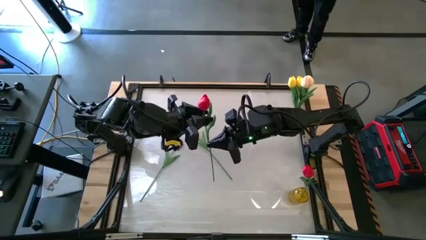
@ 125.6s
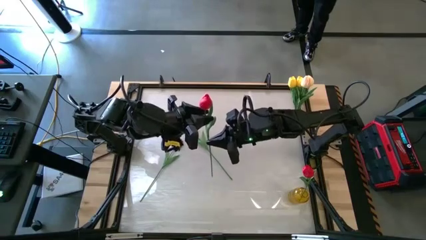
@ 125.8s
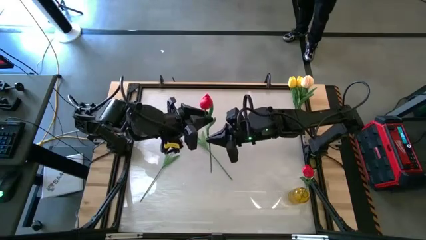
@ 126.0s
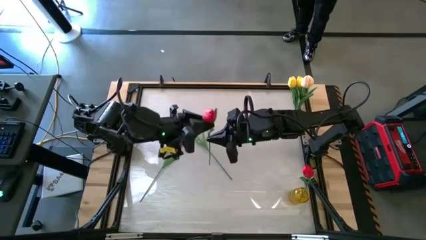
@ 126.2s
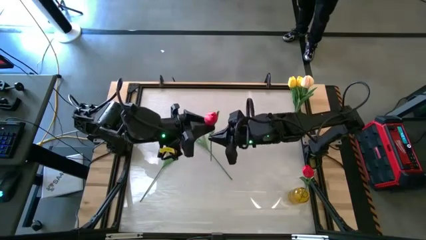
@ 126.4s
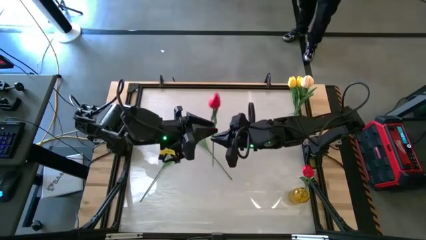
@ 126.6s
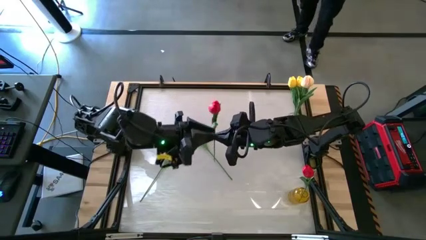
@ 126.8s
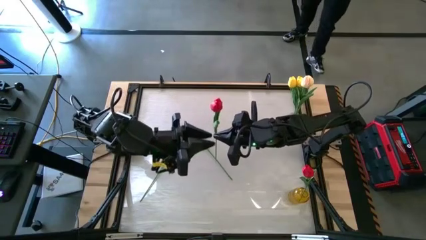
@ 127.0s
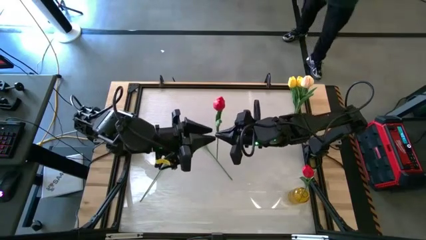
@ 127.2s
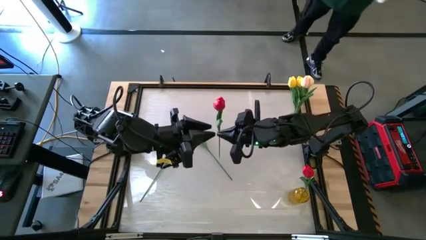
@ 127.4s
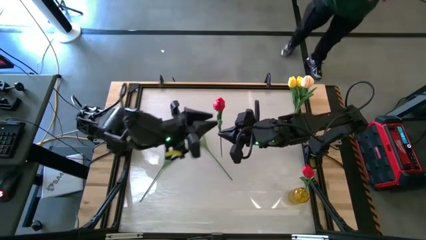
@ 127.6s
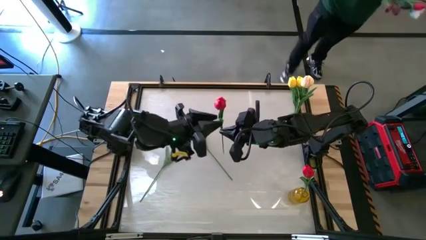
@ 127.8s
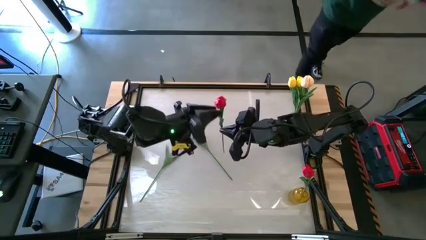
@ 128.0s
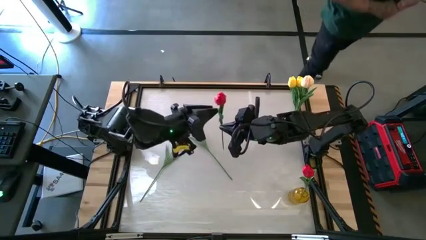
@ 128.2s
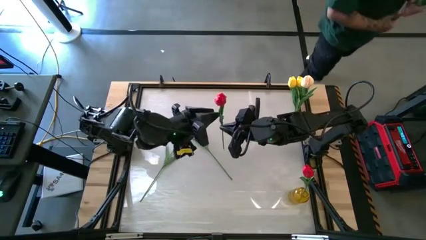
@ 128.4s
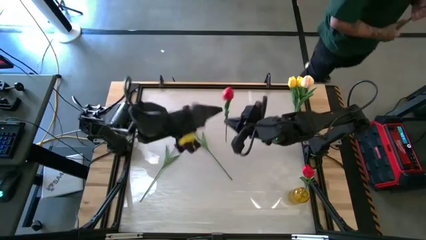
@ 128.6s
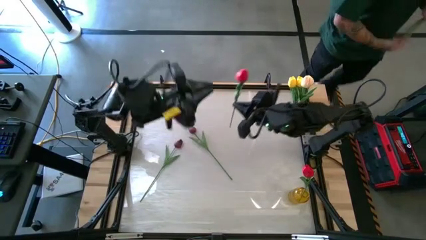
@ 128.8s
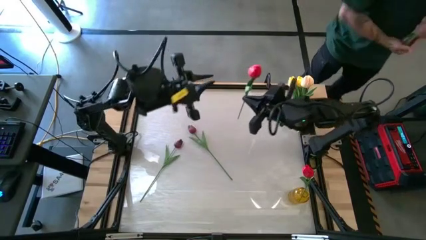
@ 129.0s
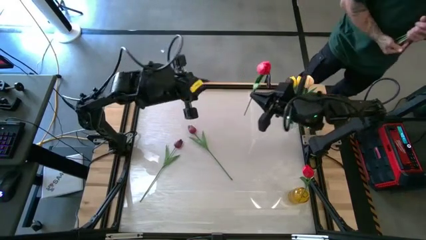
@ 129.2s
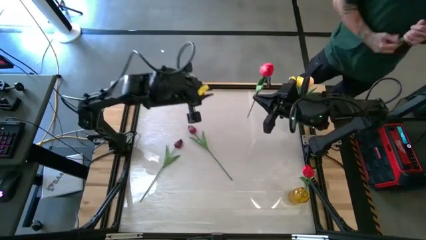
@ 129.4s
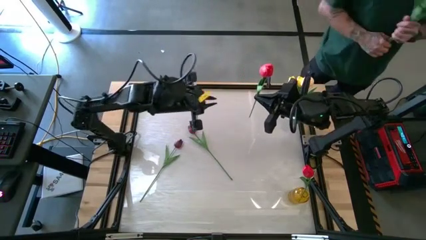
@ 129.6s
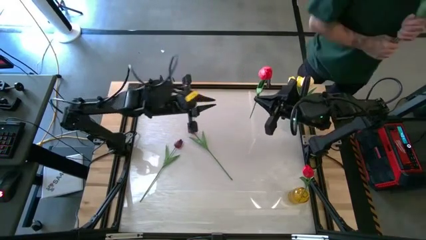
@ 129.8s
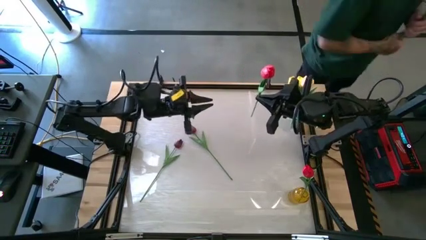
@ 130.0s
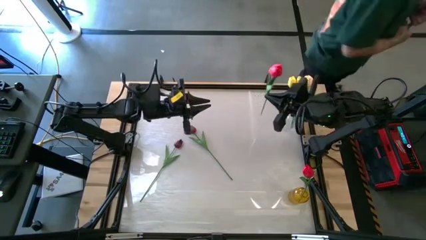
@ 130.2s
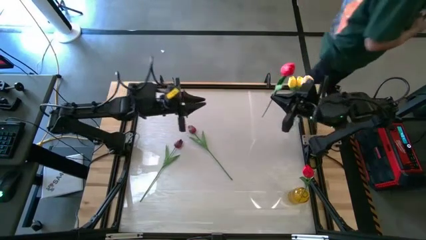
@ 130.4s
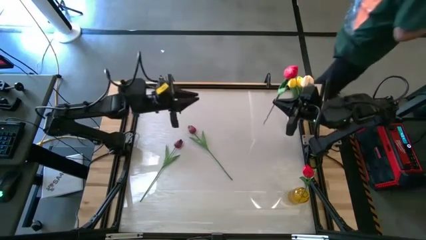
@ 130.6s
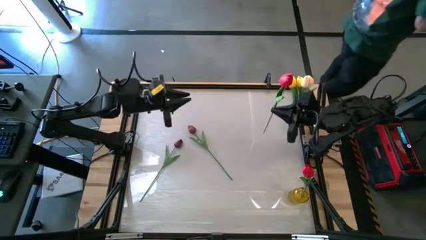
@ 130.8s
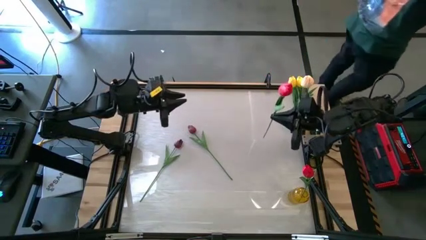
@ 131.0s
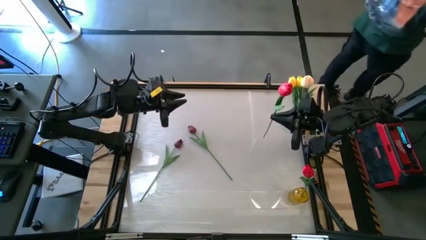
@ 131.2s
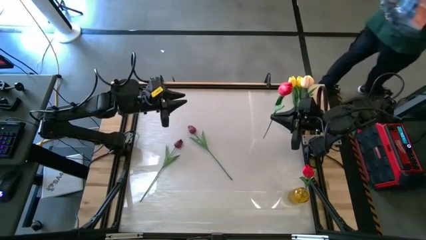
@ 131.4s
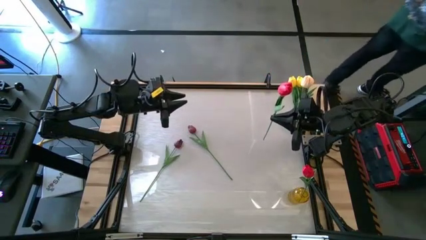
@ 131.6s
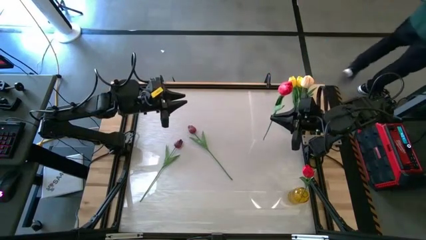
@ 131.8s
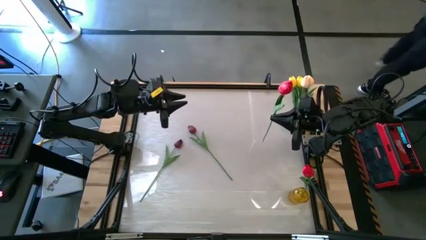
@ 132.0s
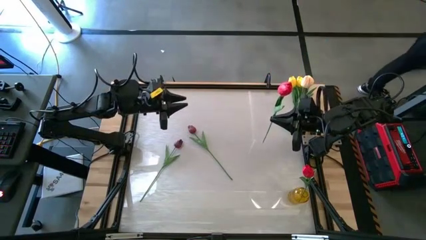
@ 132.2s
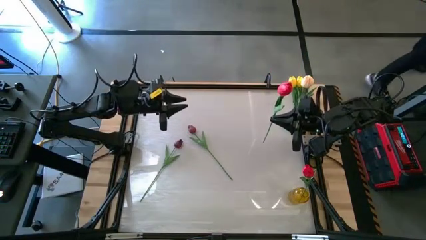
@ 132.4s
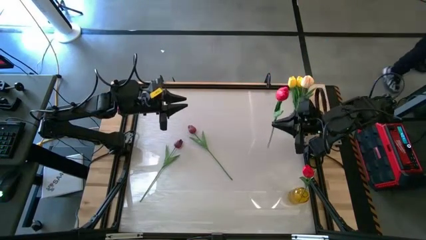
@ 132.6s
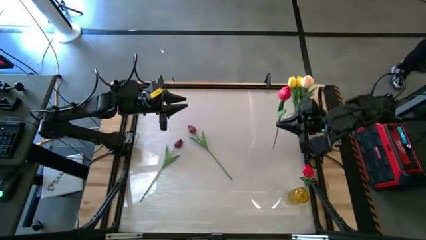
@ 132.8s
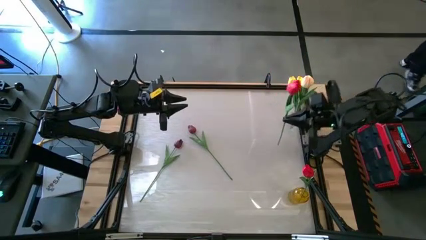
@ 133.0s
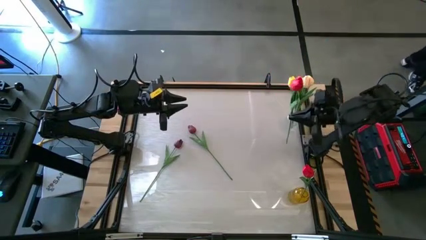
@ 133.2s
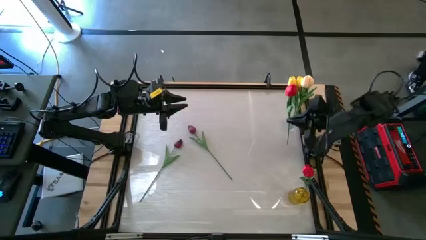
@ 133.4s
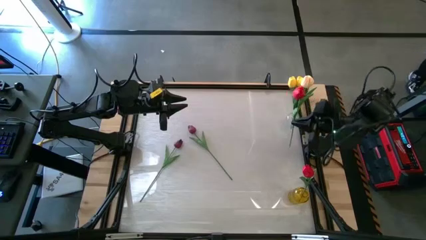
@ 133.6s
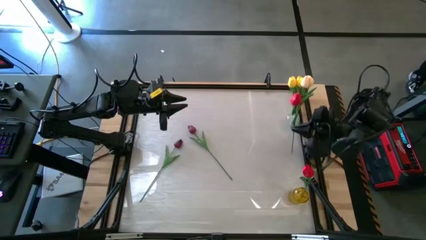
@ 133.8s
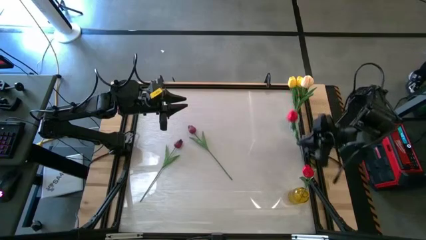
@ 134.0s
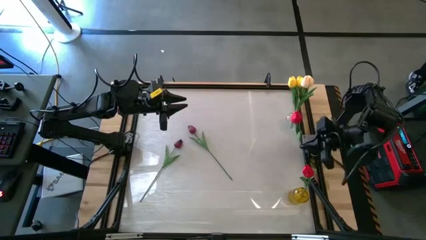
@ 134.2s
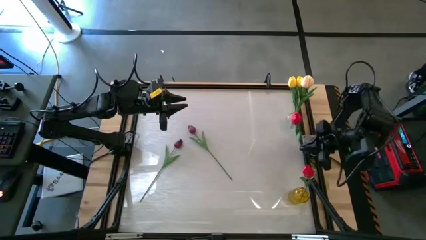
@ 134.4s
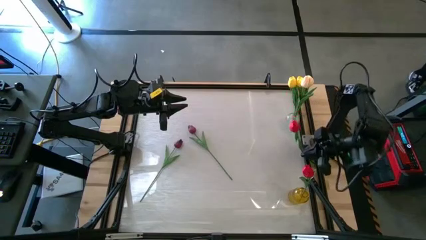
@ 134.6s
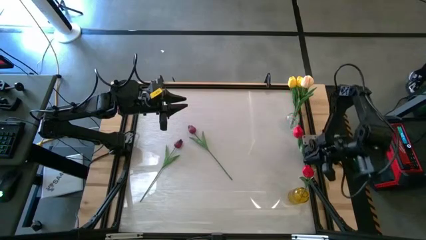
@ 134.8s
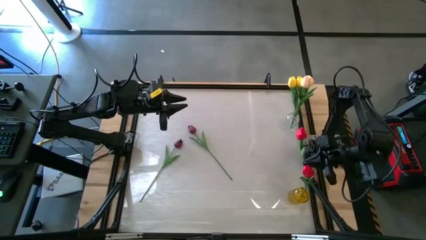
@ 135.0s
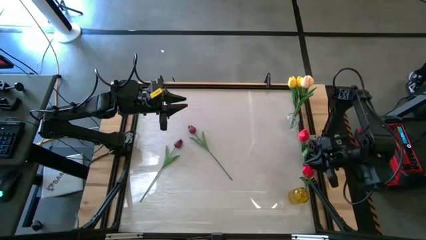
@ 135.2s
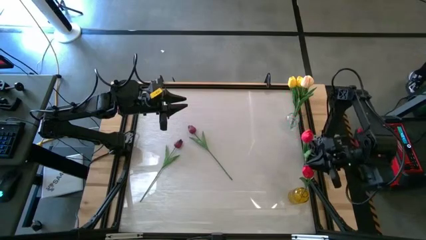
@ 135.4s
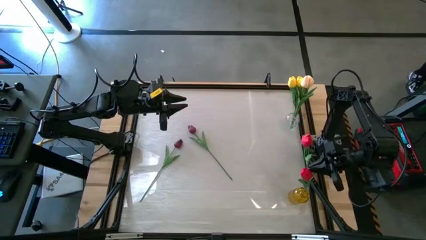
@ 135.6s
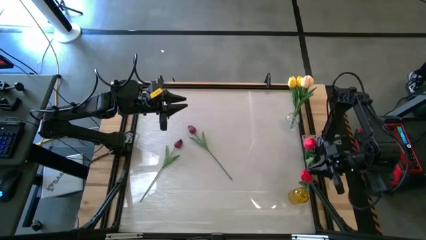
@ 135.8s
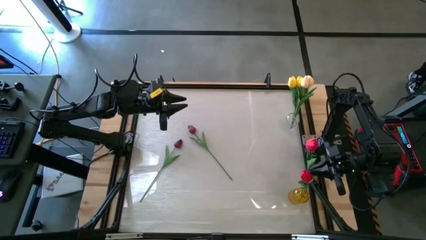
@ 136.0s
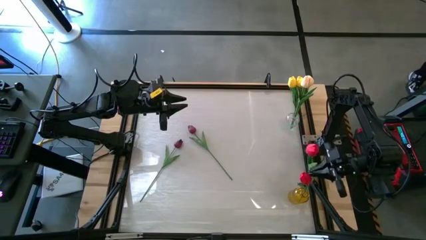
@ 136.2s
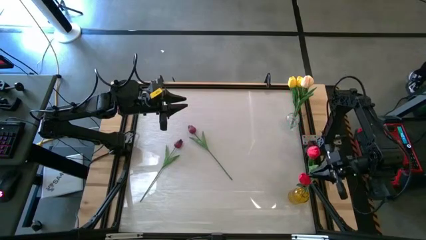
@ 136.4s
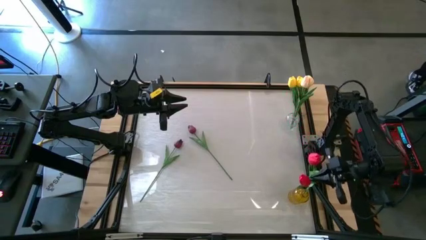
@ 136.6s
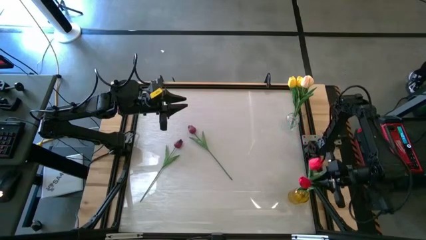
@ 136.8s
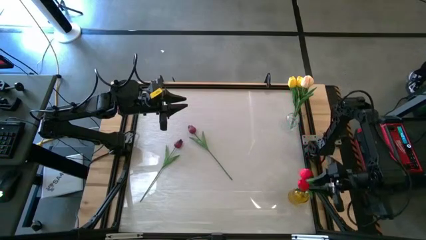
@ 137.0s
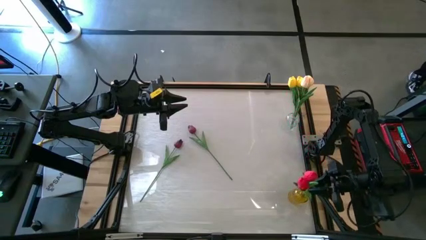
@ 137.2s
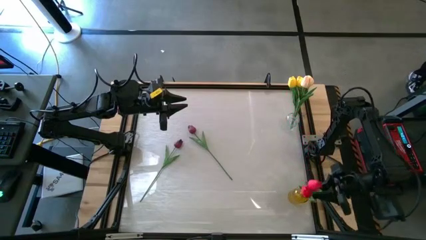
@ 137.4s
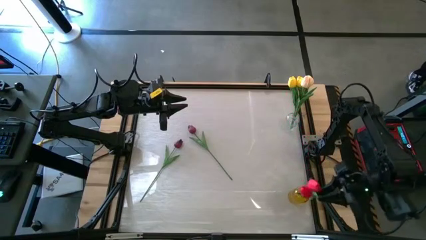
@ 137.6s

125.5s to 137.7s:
Task: Sort flowers into vase by color
Put the red tulip into the yellow vase
